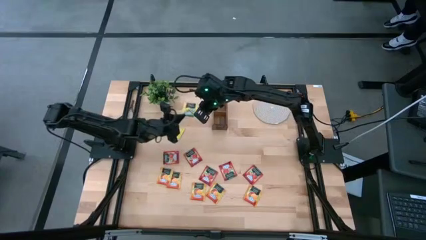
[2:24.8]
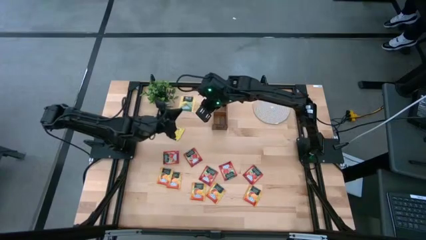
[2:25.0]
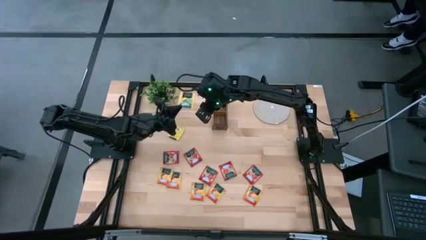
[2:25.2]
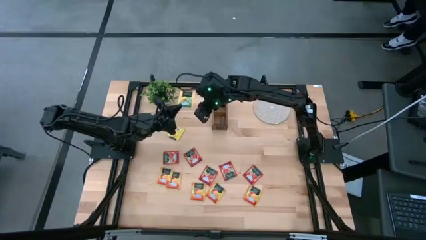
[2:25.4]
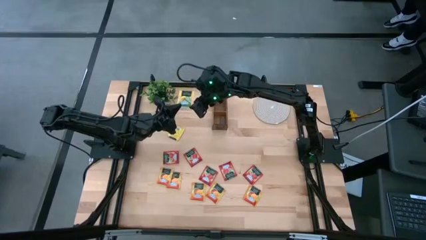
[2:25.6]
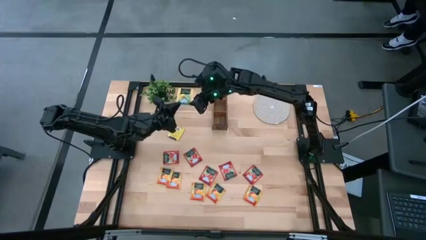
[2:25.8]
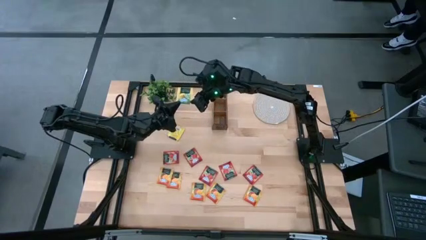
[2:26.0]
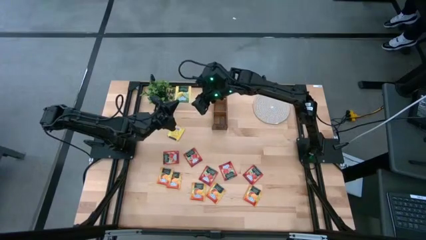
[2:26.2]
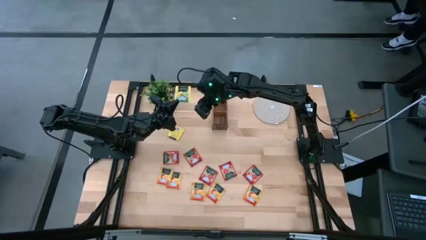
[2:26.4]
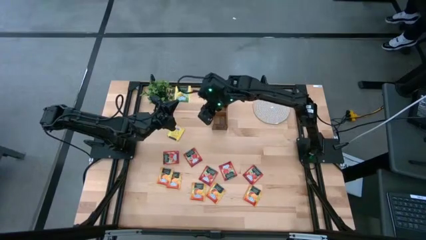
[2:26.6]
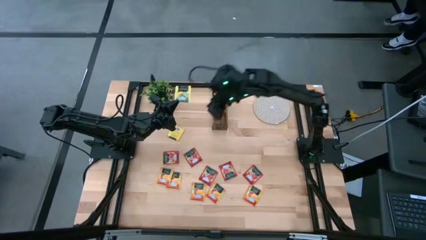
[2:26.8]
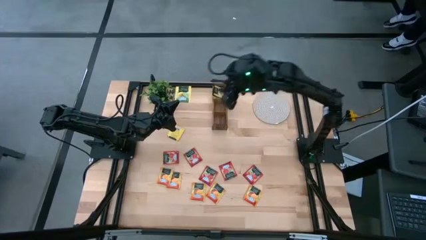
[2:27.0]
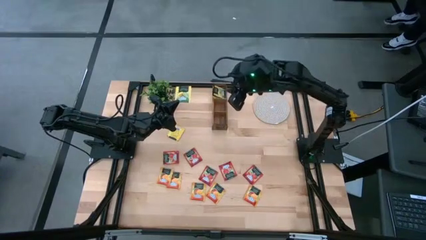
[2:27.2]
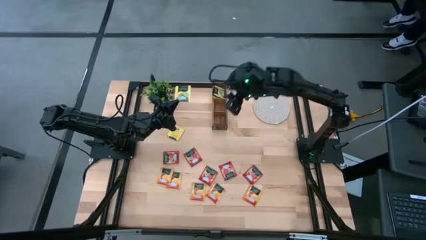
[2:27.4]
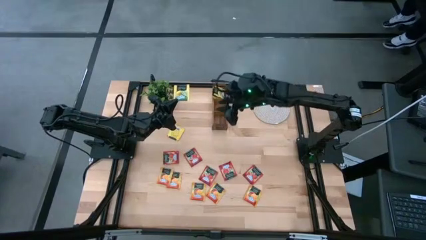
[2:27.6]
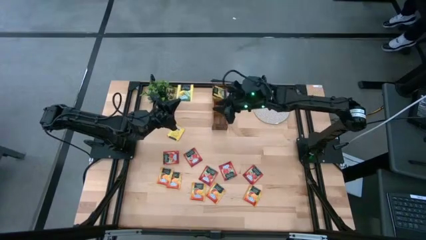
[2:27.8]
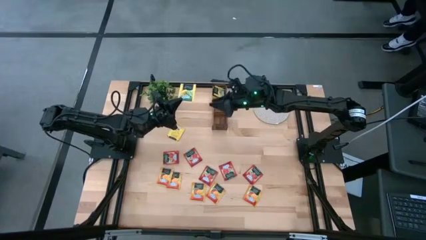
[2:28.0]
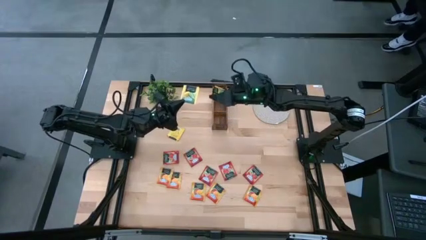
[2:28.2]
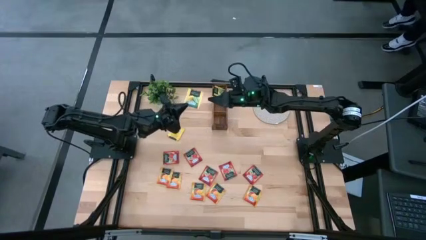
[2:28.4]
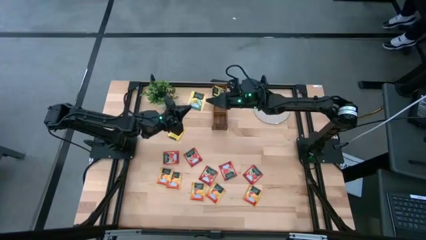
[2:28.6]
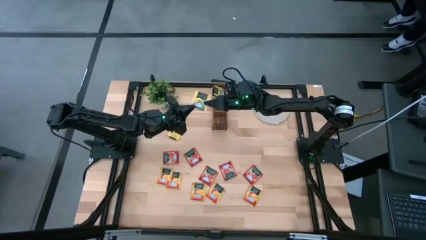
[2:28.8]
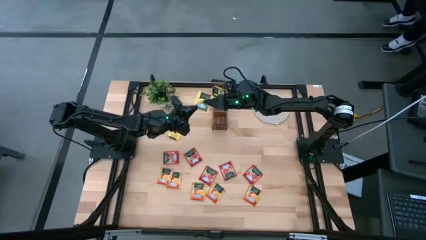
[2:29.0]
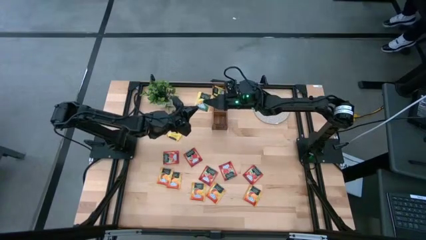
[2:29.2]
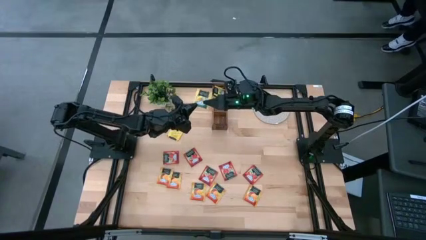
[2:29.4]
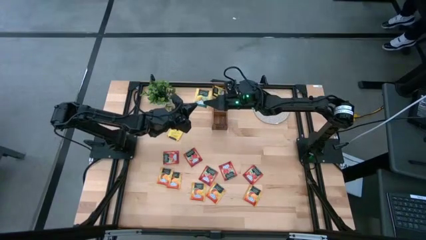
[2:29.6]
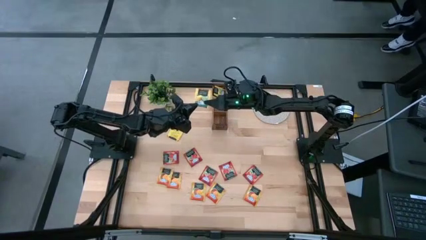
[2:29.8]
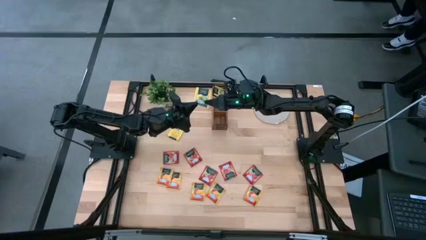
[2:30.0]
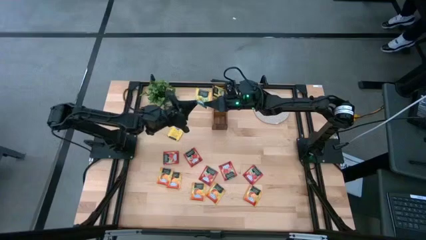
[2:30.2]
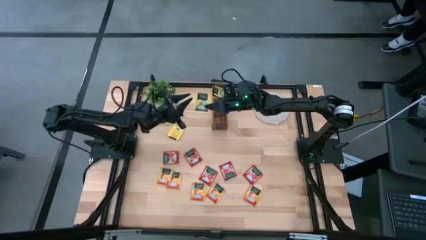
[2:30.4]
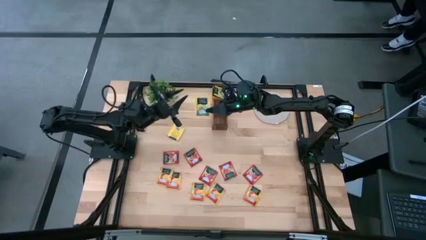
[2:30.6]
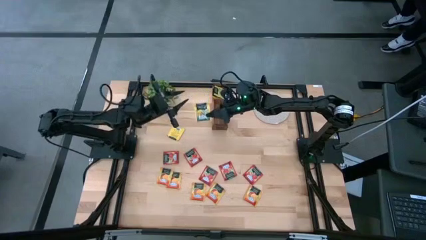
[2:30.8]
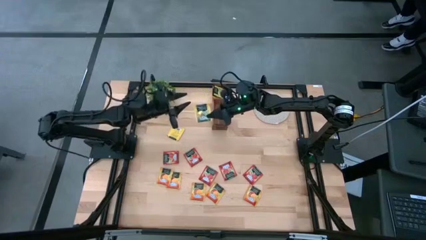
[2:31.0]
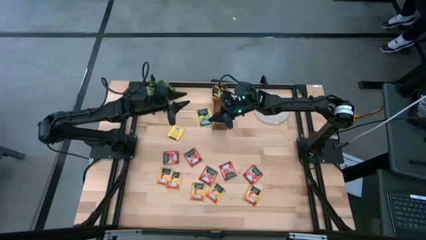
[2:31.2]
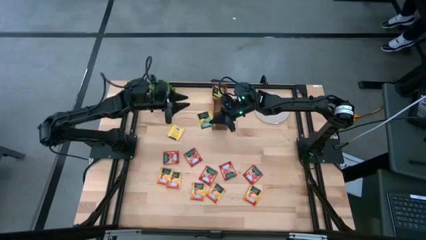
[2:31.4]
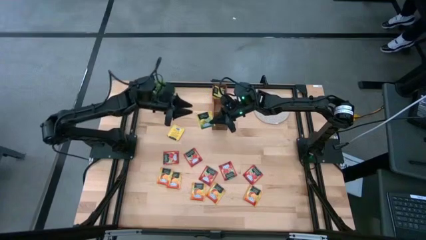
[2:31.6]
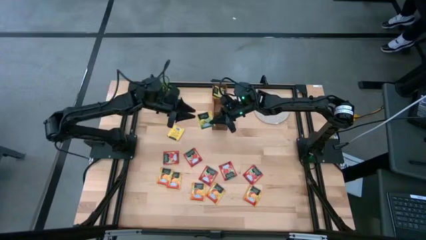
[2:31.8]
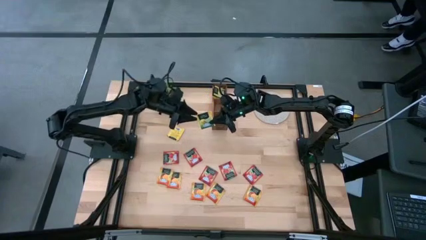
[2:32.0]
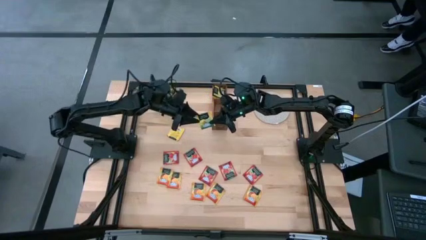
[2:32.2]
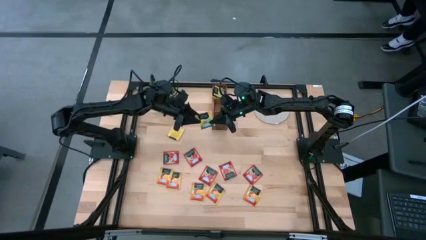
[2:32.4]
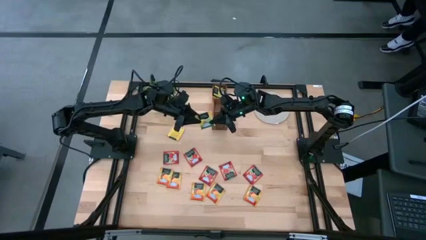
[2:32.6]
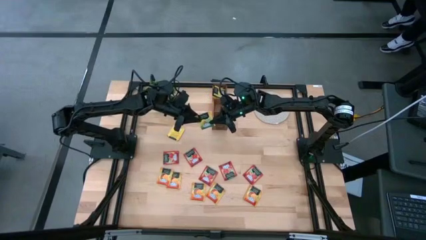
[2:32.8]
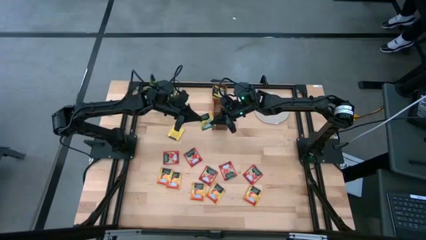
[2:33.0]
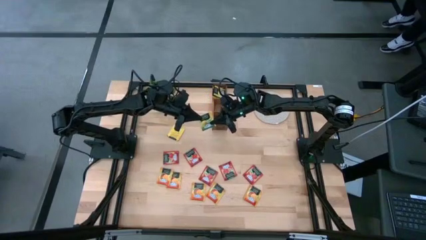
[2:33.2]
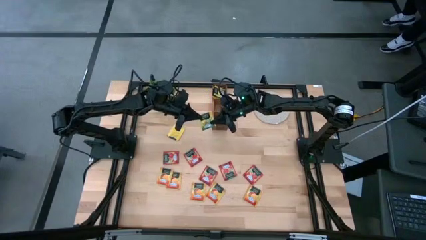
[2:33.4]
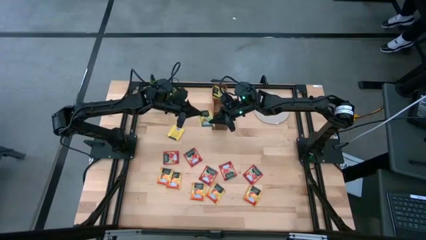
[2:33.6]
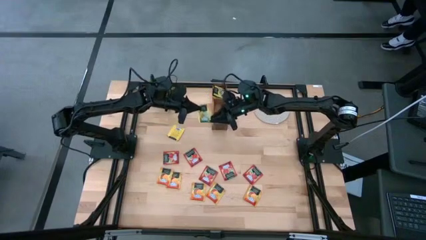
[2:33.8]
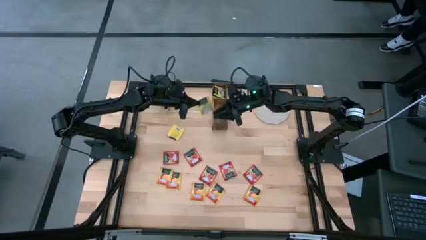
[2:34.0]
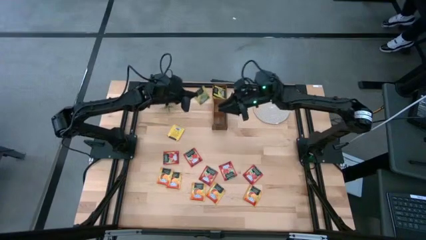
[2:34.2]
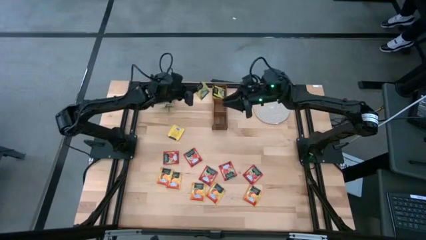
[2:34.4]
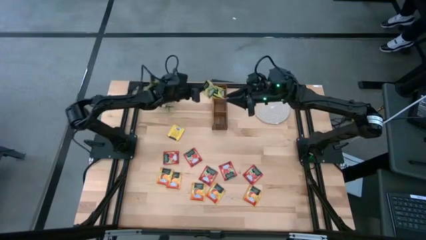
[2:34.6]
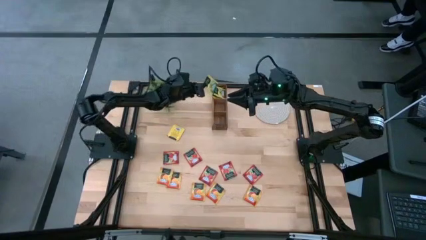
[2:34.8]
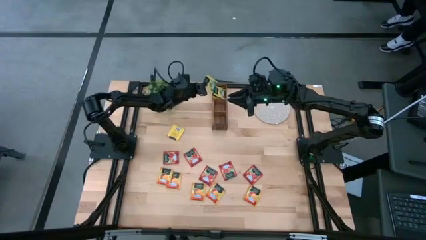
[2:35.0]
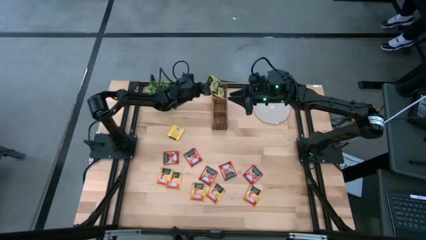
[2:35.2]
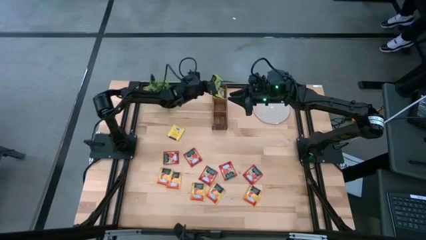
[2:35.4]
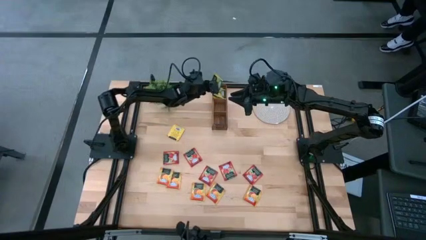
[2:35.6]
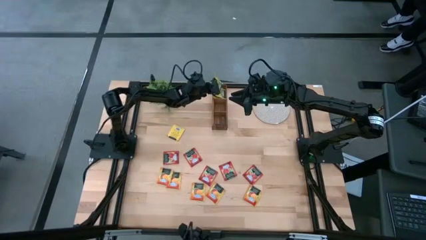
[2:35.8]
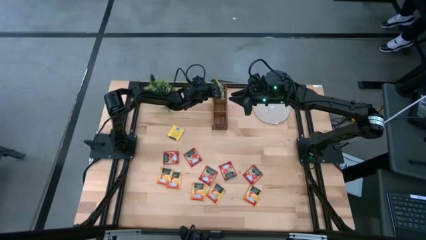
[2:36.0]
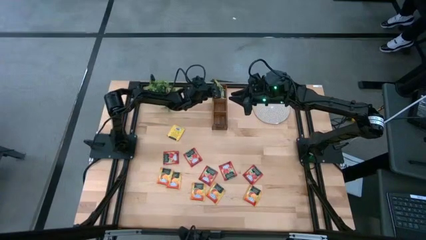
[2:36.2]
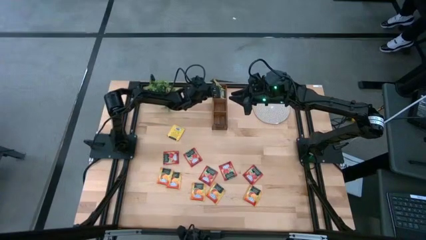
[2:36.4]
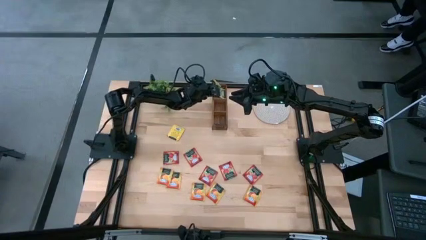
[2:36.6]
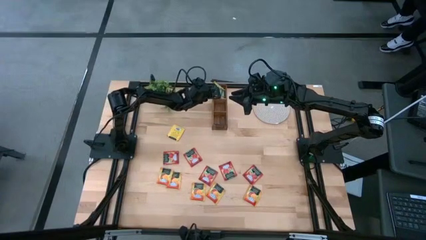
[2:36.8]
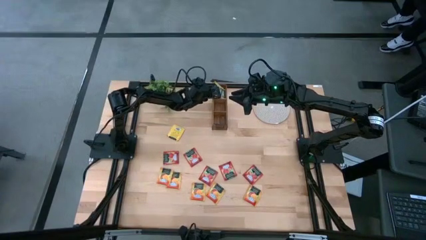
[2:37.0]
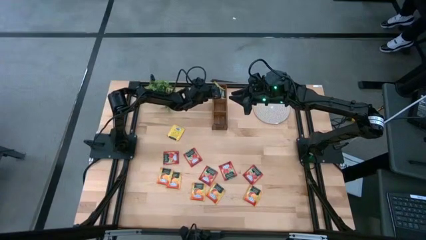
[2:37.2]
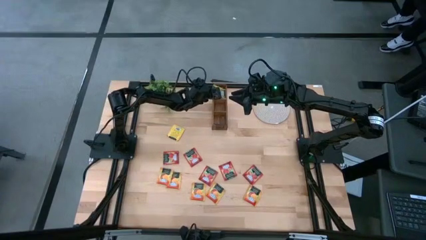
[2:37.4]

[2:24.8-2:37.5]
Task: Pick & Place Tea
Put the yellow tea bag into the left section of the wooden organizer

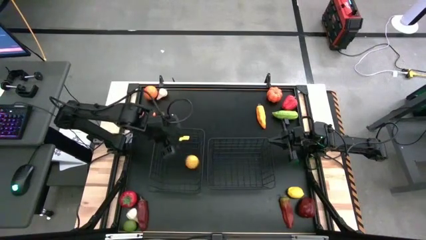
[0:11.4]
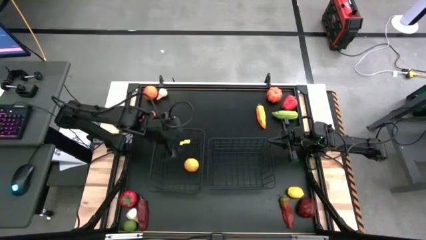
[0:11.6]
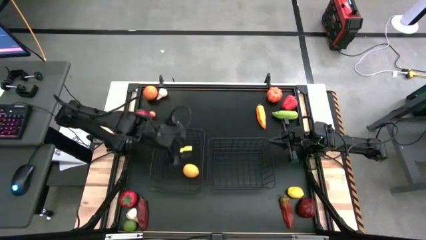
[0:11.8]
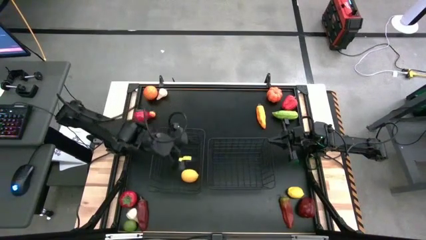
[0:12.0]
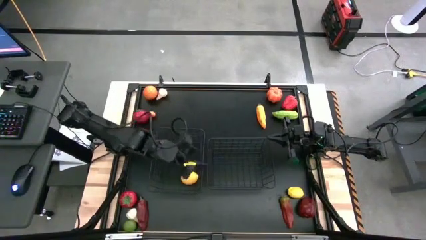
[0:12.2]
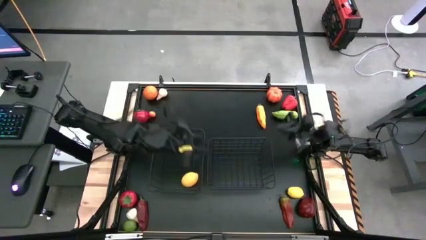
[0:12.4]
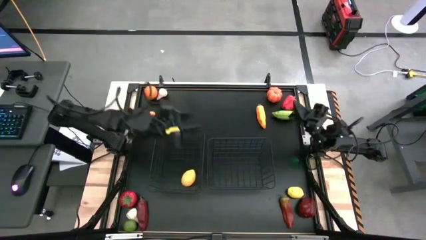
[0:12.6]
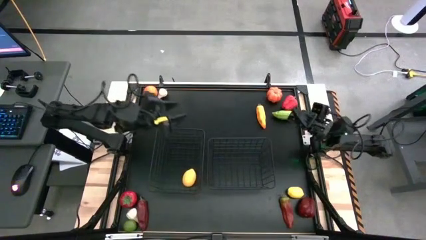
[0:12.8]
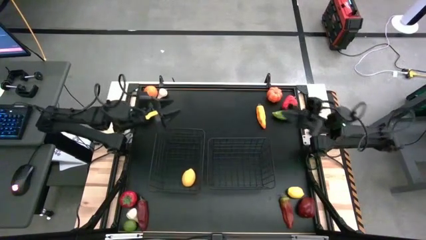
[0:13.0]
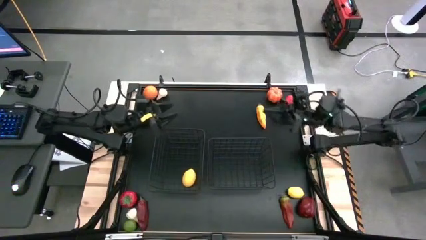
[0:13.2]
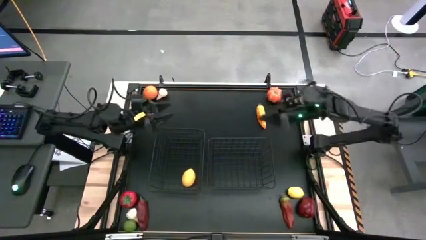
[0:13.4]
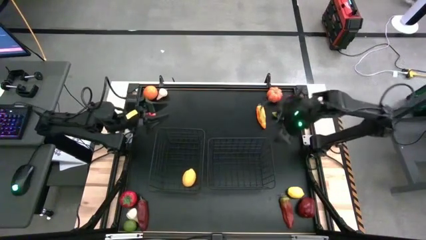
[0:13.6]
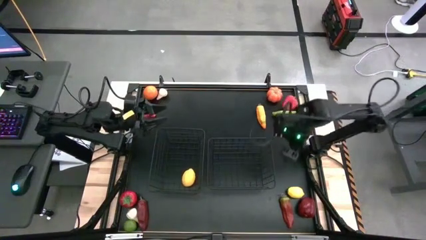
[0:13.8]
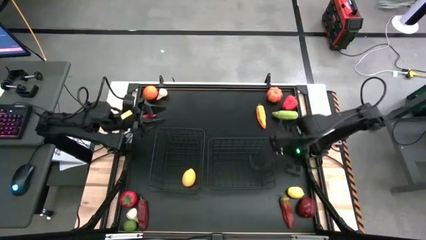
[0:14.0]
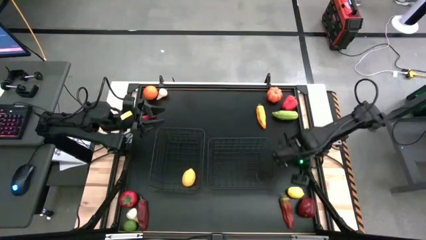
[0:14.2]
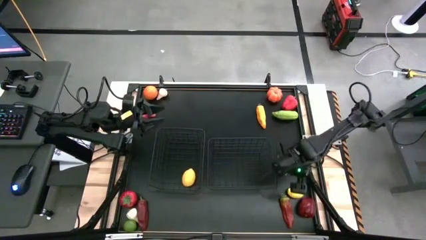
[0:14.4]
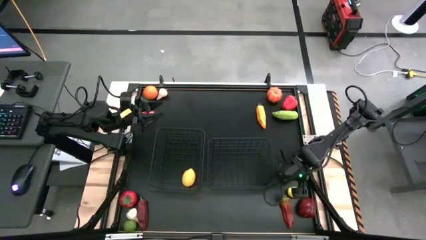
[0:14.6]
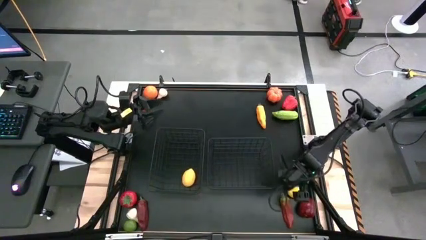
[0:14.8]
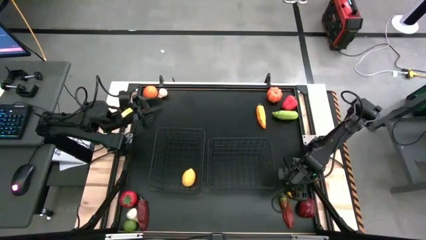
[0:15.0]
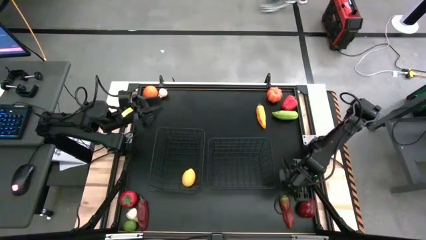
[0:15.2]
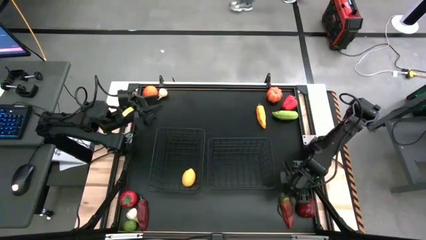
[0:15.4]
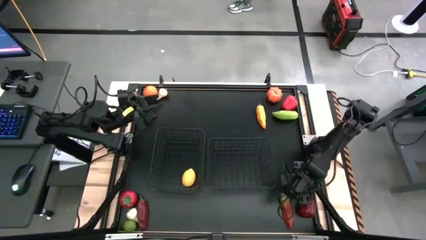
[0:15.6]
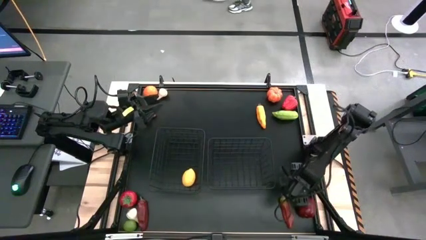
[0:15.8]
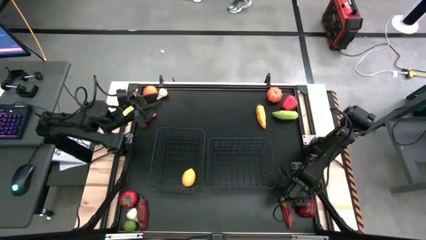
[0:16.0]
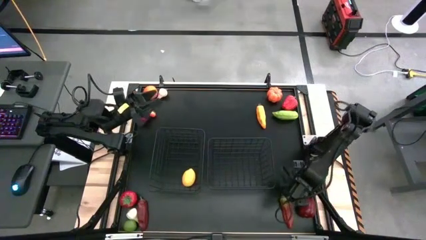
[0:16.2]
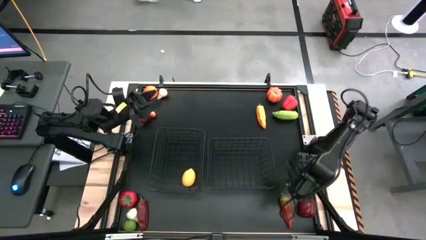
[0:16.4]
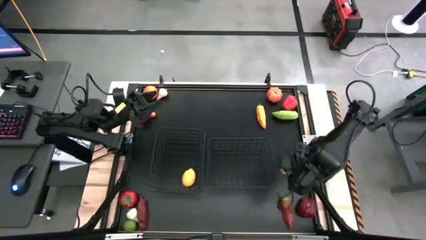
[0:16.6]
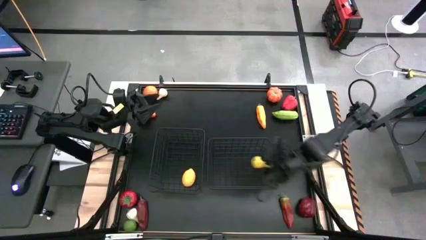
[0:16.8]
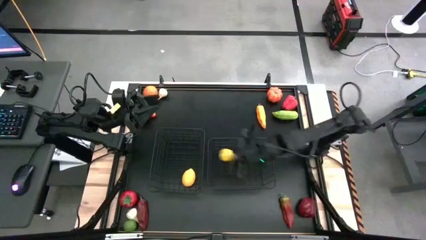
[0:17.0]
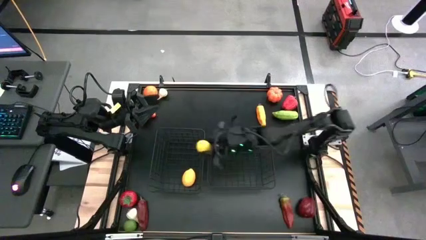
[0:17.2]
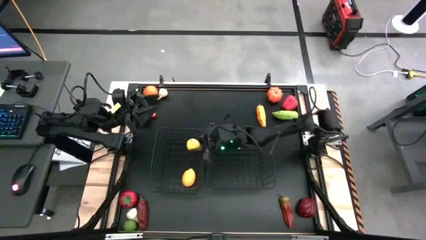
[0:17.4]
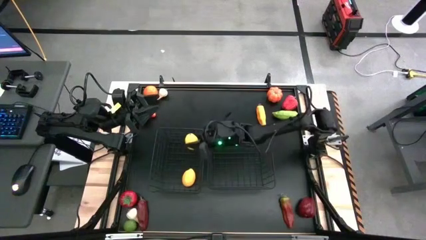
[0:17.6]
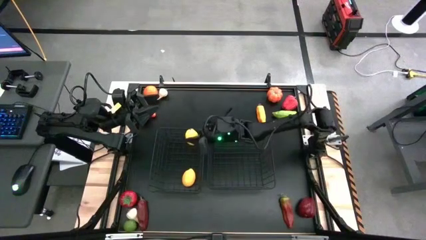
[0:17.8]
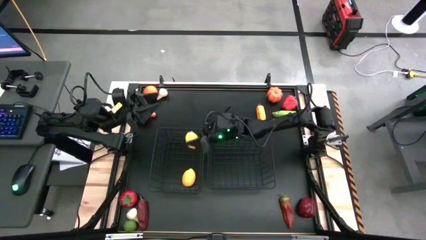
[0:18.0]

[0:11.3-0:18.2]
Task: Sort produce into baskets
Put the yellow lemon into the left wire basket
